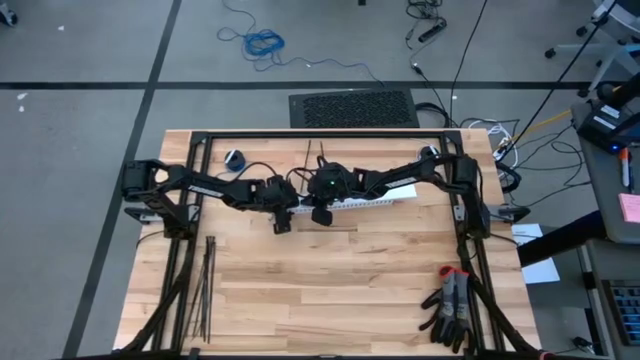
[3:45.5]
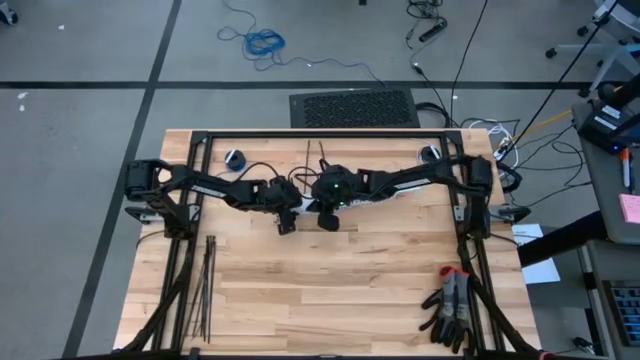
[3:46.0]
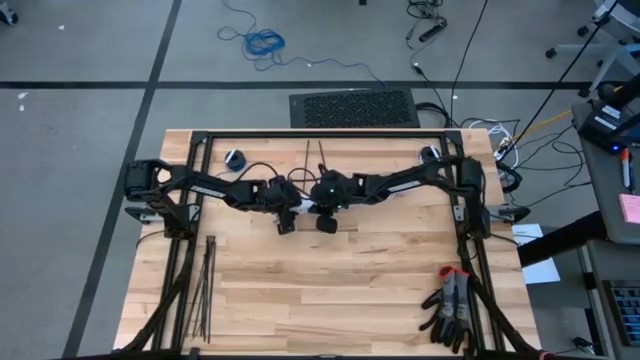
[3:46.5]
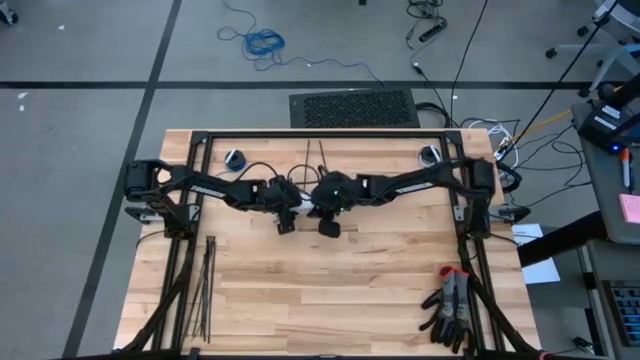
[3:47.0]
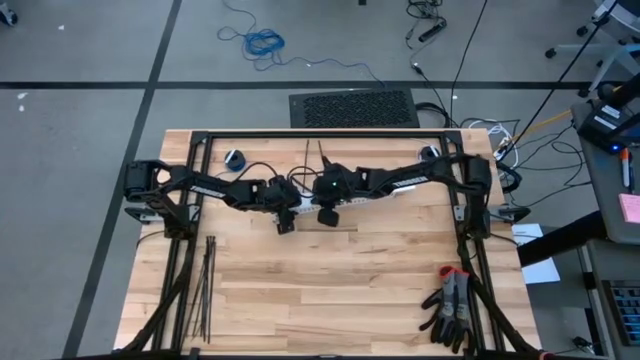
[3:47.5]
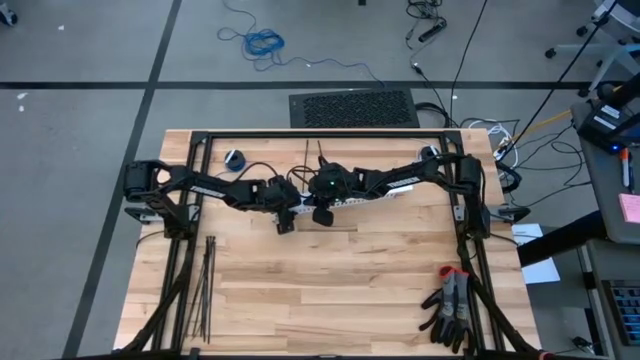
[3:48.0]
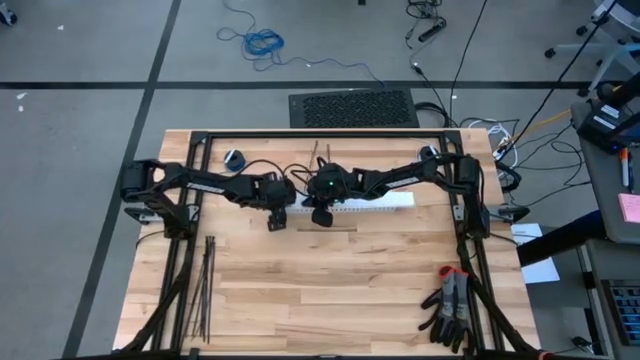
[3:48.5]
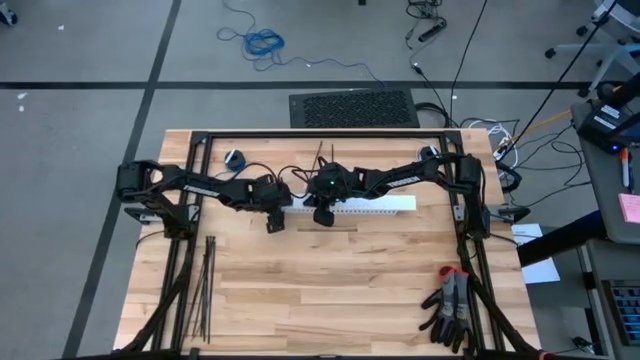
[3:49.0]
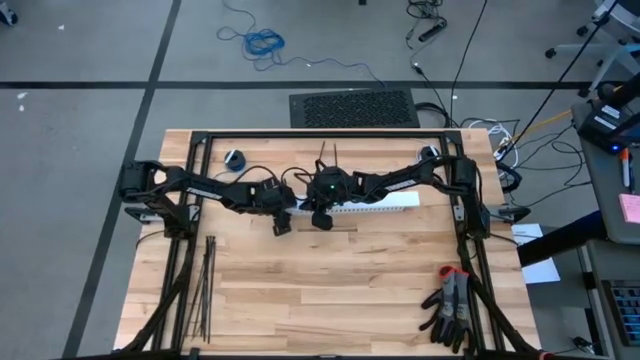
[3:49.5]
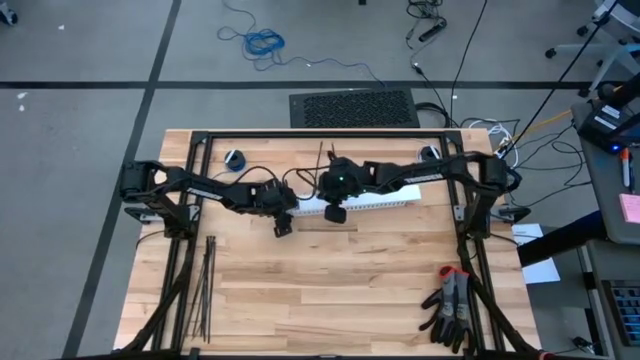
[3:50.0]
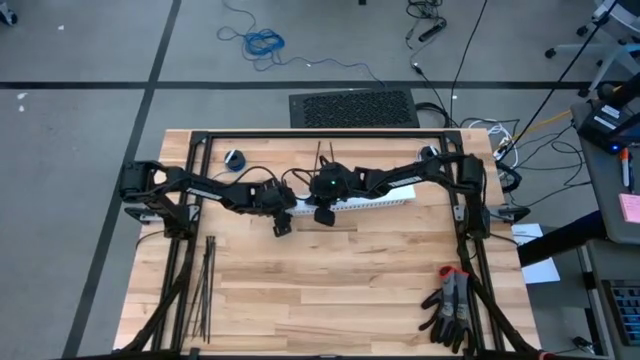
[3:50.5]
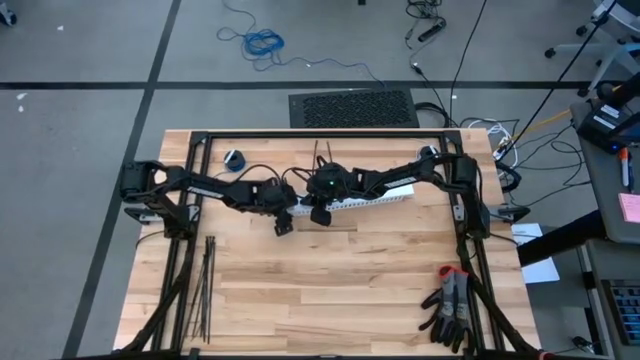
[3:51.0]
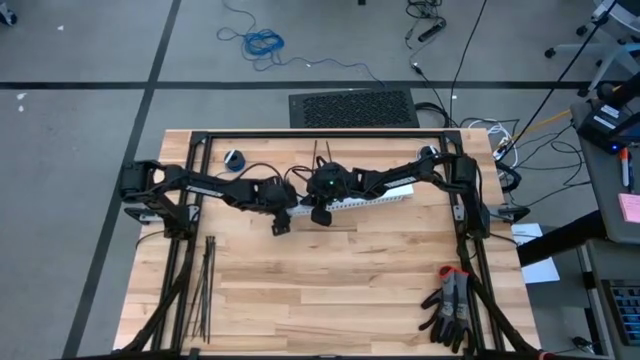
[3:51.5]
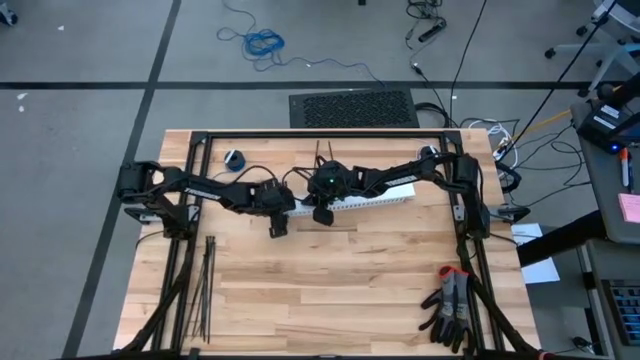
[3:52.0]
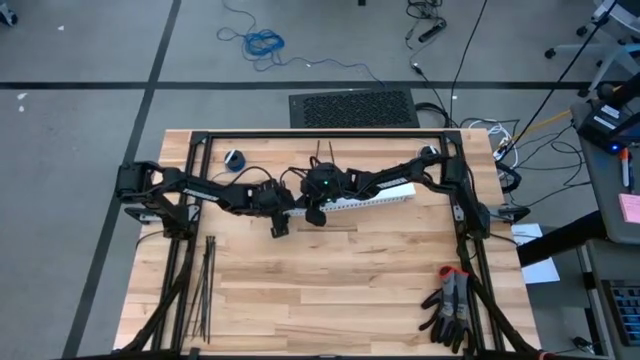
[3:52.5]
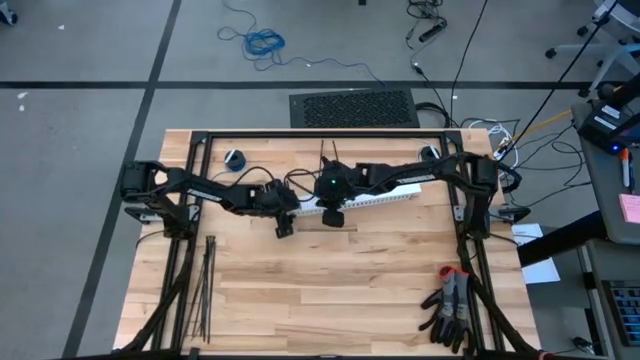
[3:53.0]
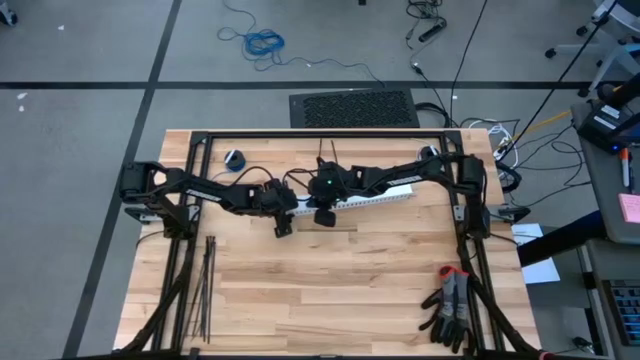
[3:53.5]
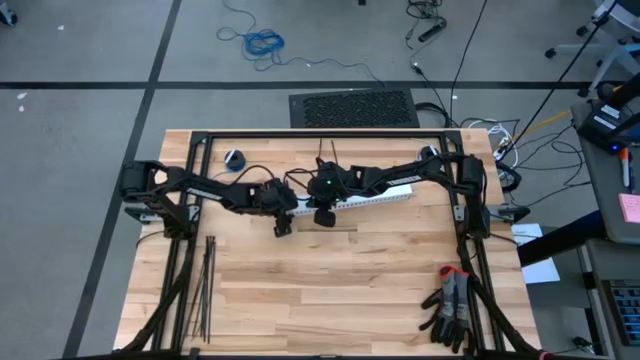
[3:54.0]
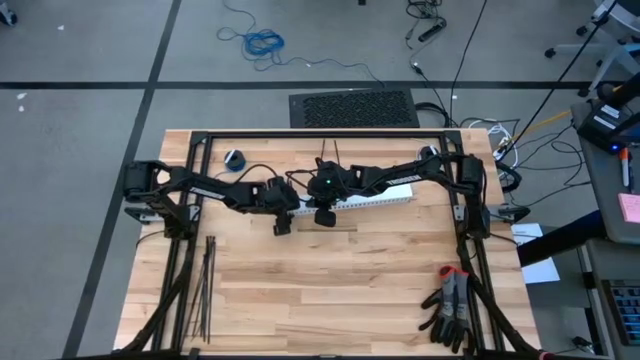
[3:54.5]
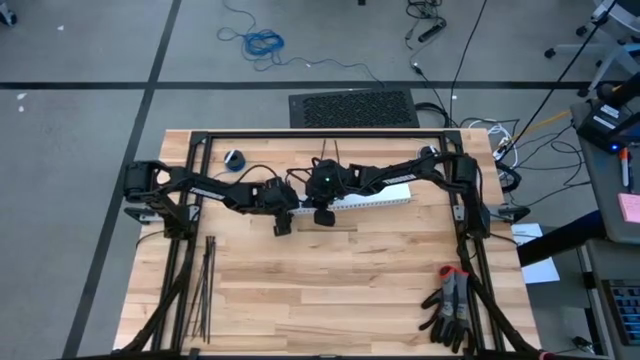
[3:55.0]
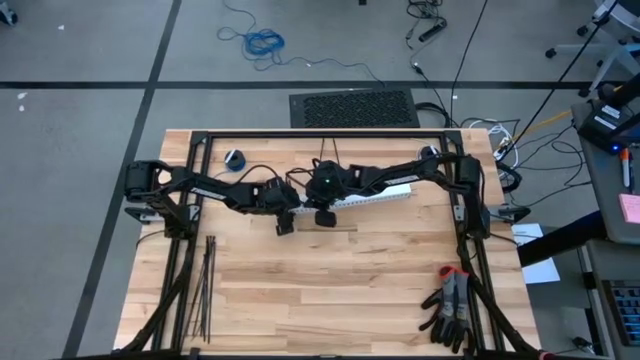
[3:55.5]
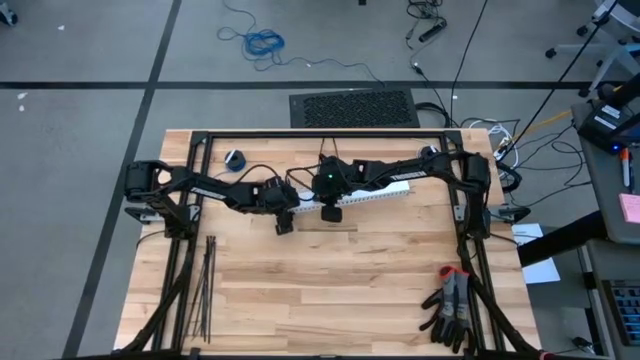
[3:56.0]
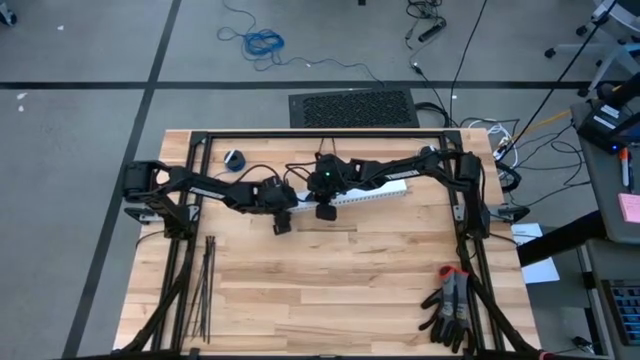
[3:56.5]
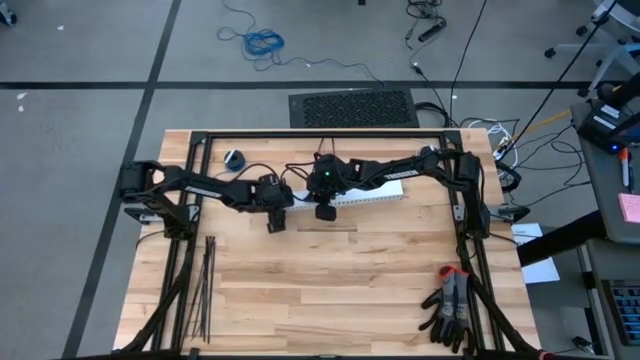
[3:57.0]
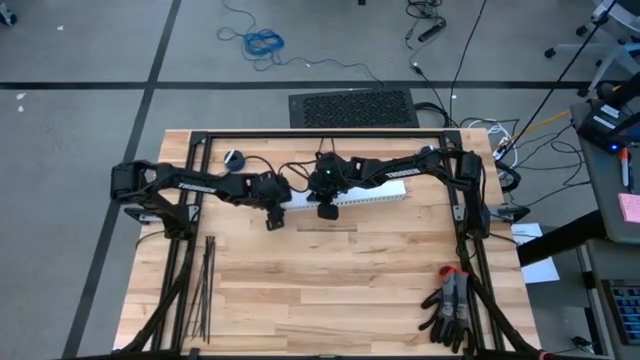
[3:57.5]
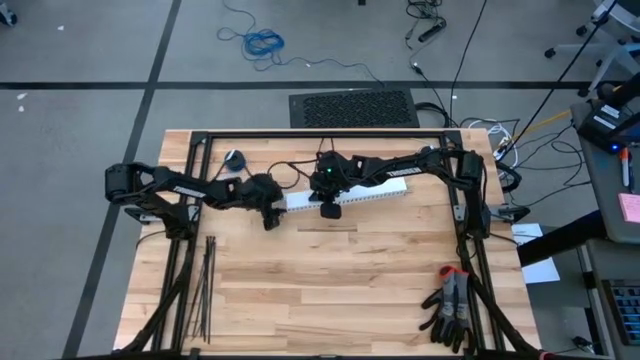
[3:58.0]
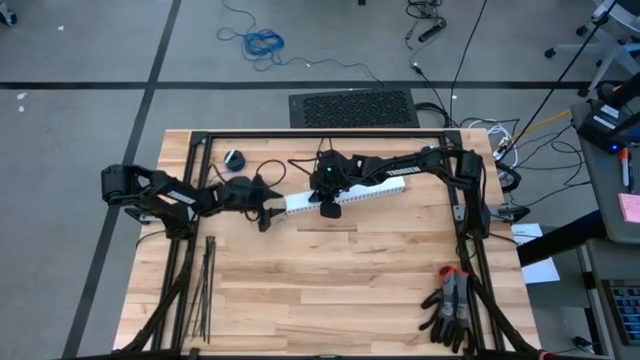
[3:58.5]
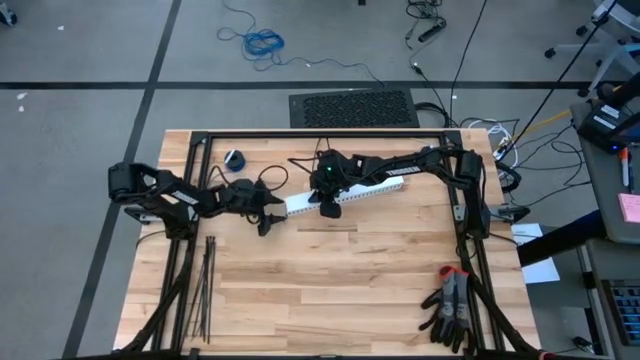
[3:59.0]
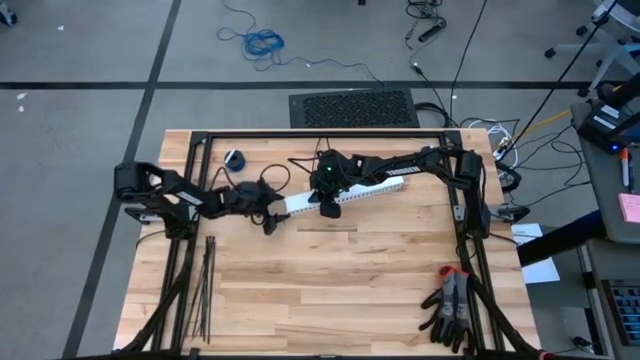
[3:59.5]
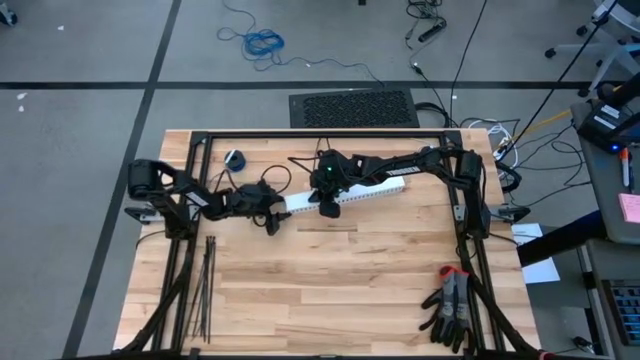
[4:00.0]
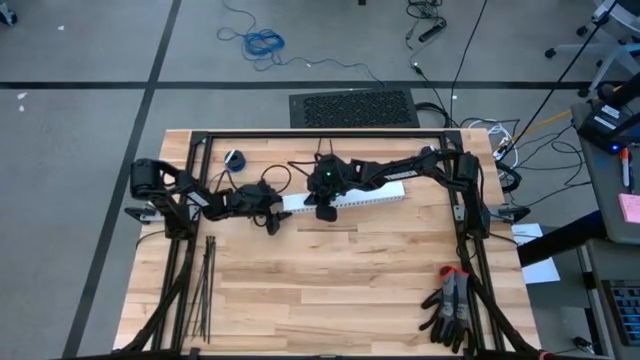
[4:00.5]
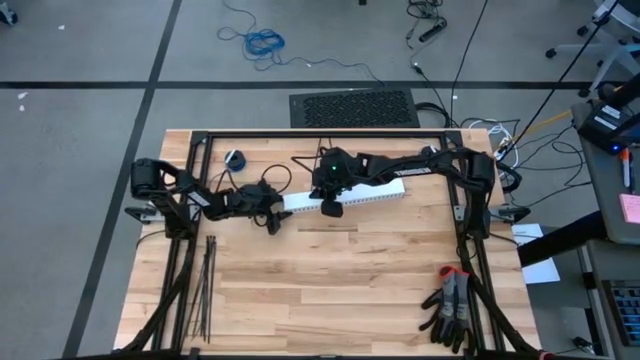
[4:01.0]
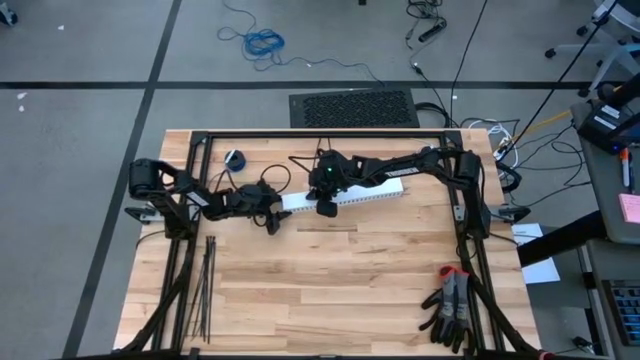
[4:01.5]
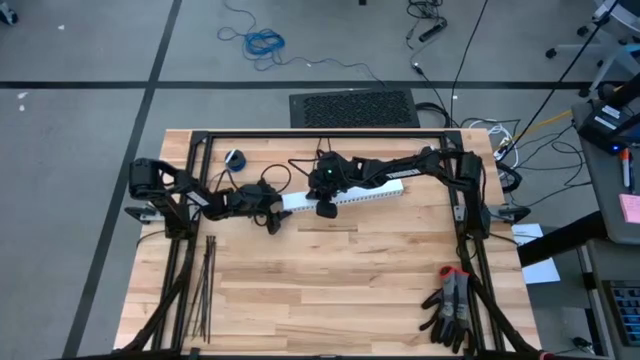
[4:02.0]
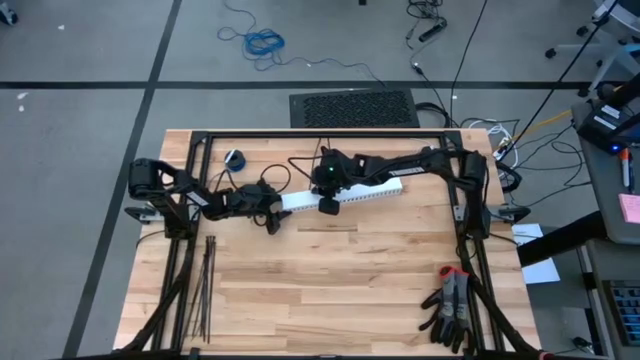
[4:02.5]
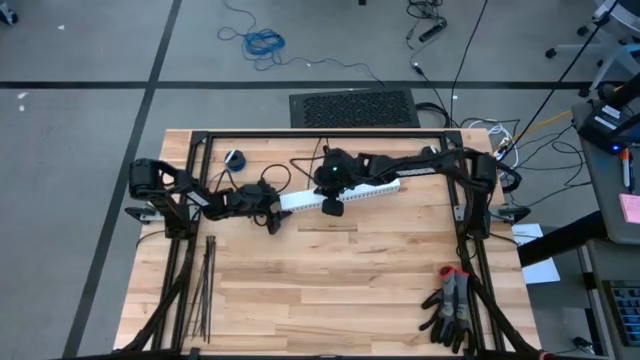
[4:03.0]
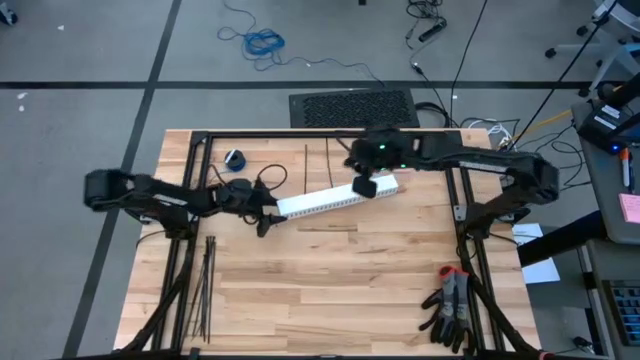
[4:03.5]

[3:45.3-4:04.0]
Task: Ziptie cables
Close the white cable duct

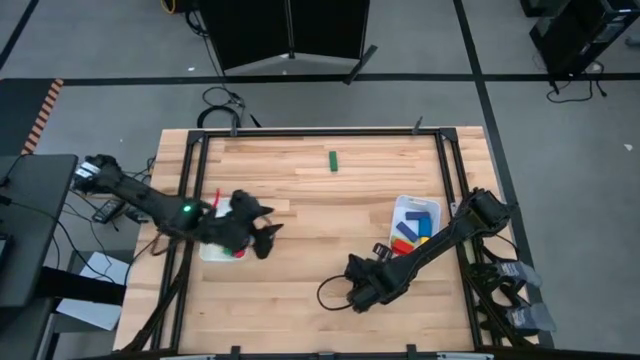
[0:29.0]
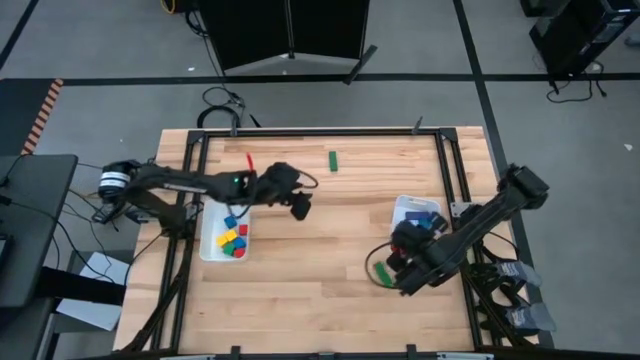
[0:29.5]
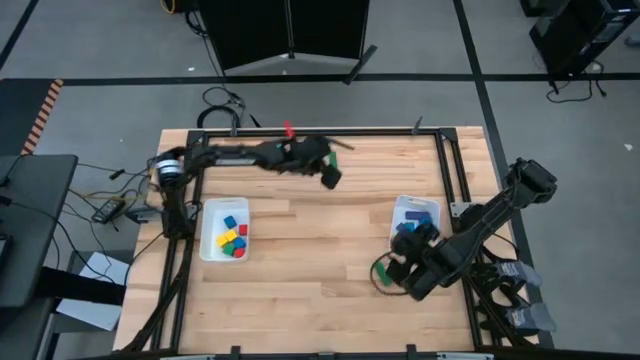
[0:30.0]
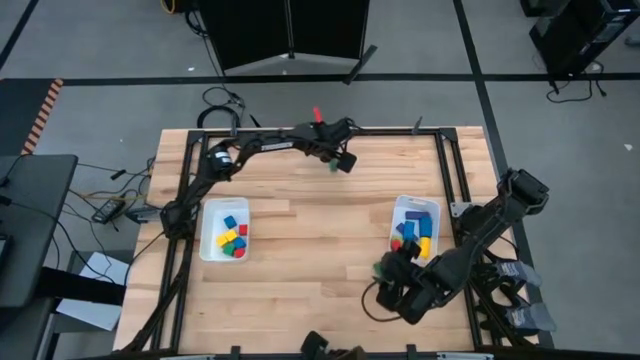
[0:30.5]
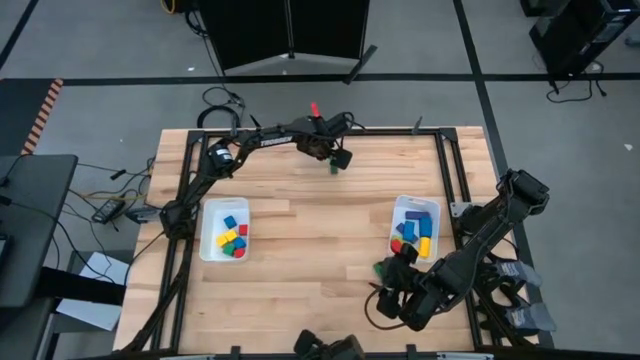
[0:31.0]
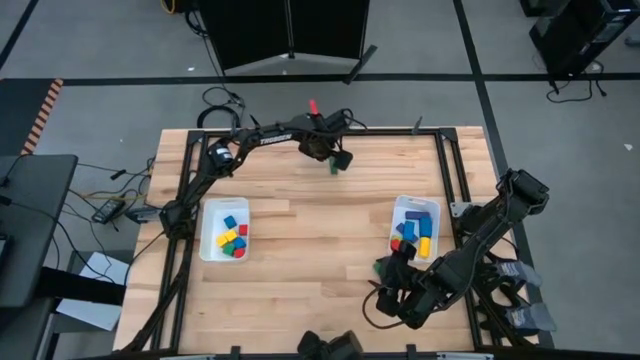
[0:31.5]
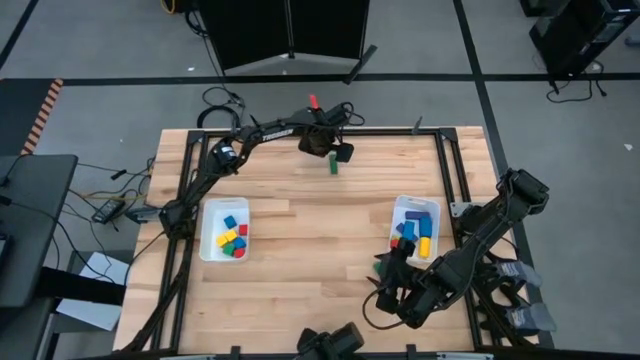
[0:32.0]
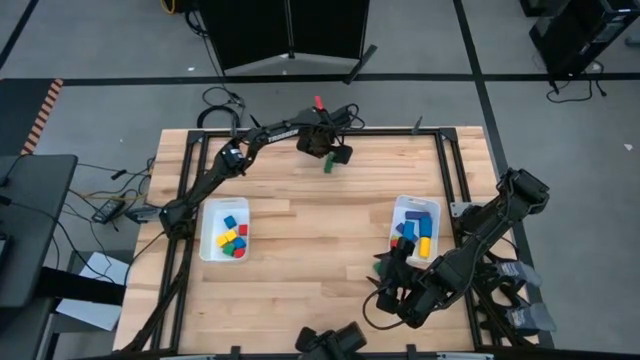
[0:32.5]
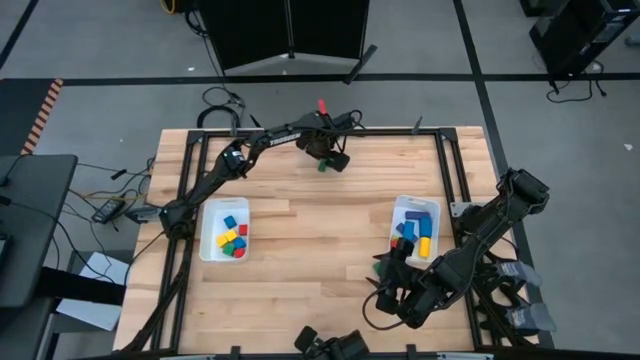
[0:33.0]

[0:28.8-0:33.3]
Task: Sort blocks by size
Put the blue game piece into the bin
